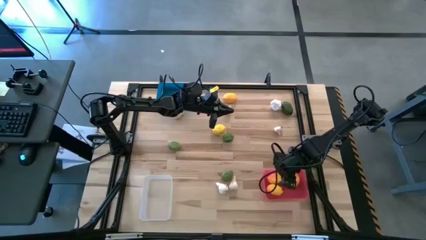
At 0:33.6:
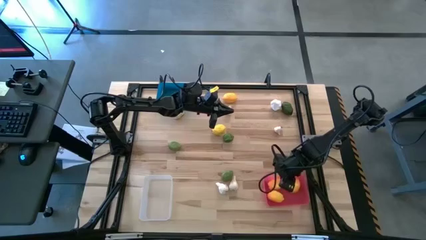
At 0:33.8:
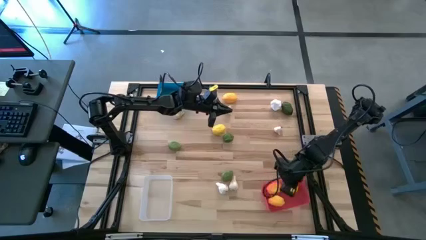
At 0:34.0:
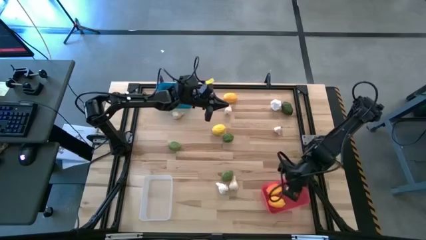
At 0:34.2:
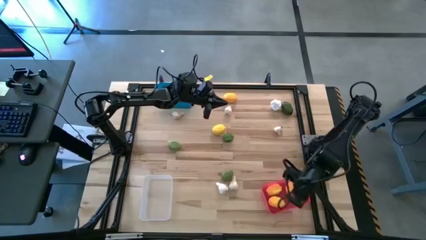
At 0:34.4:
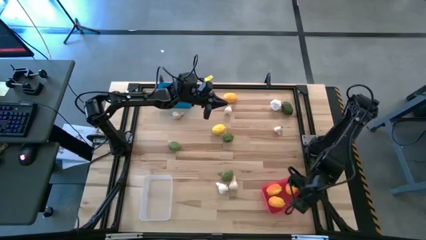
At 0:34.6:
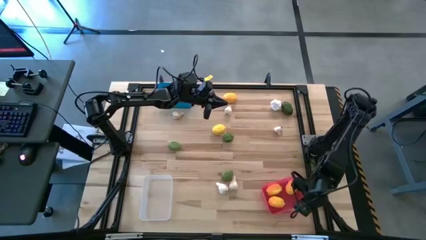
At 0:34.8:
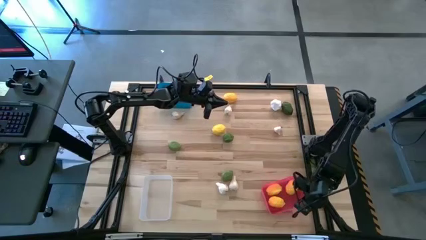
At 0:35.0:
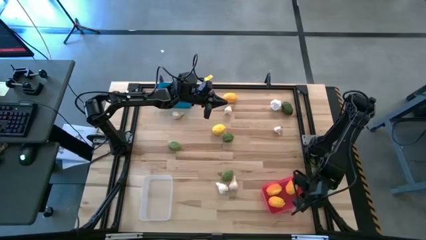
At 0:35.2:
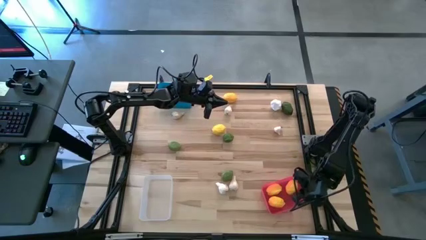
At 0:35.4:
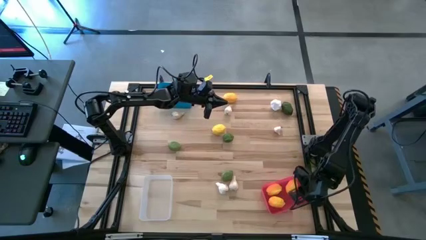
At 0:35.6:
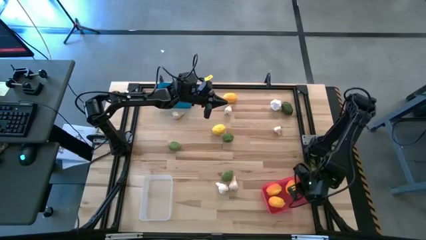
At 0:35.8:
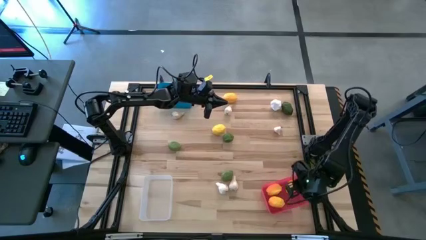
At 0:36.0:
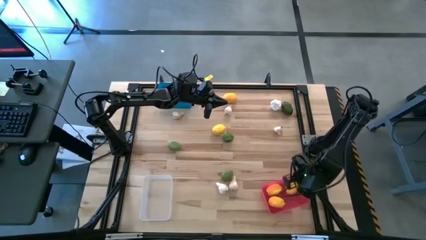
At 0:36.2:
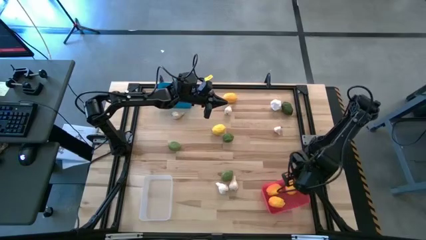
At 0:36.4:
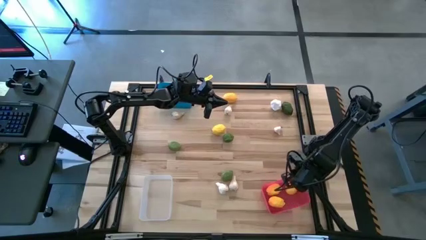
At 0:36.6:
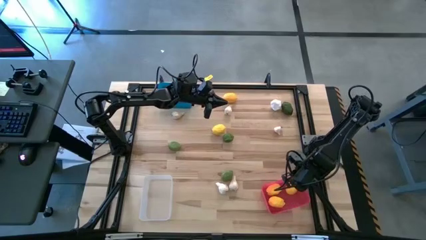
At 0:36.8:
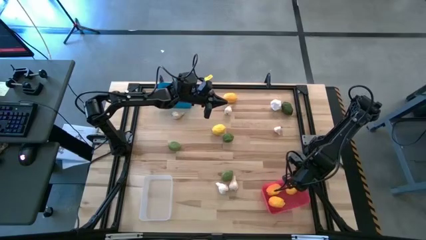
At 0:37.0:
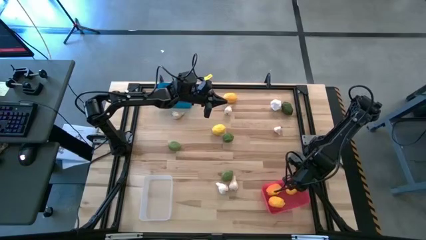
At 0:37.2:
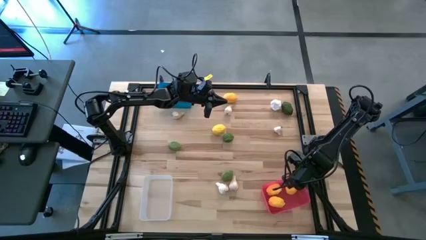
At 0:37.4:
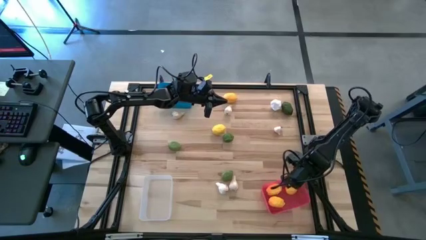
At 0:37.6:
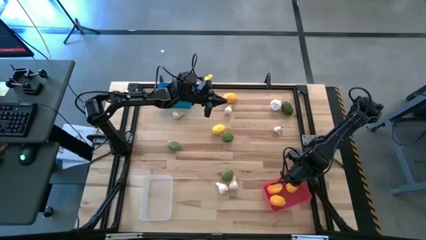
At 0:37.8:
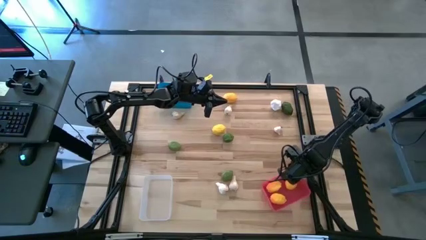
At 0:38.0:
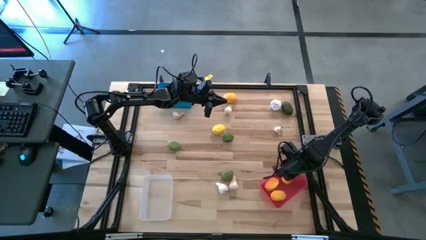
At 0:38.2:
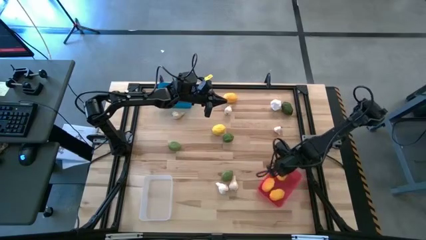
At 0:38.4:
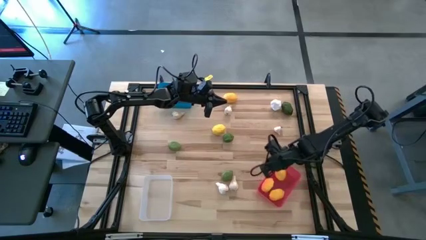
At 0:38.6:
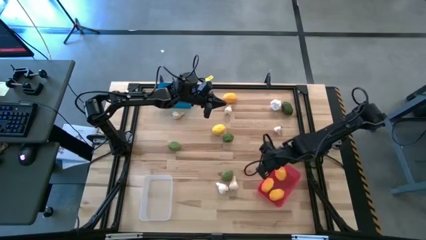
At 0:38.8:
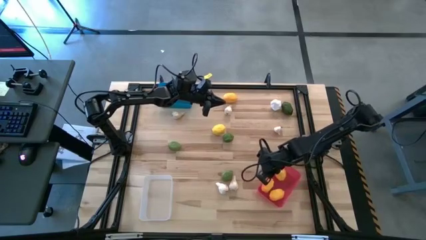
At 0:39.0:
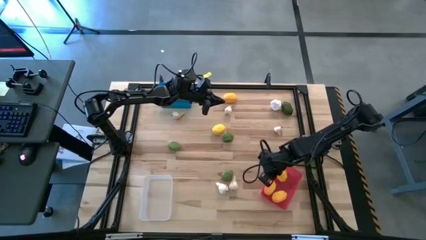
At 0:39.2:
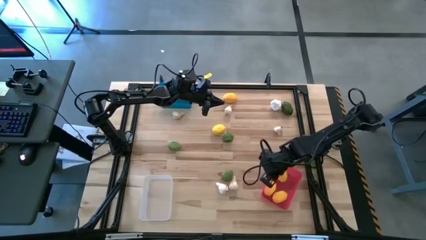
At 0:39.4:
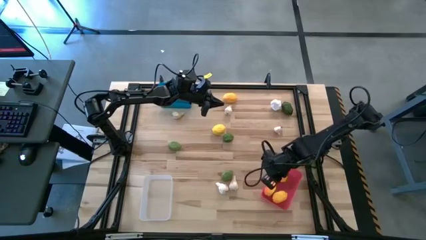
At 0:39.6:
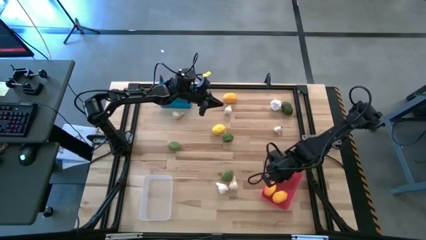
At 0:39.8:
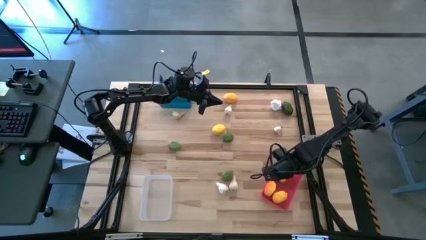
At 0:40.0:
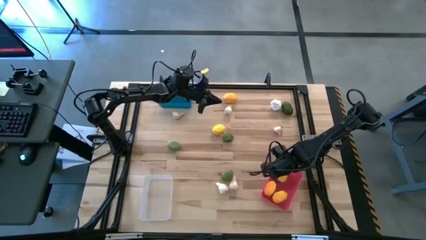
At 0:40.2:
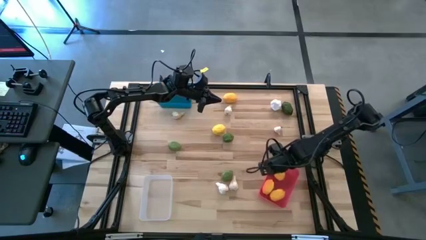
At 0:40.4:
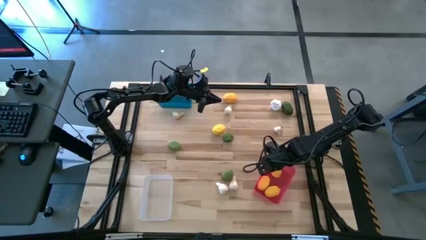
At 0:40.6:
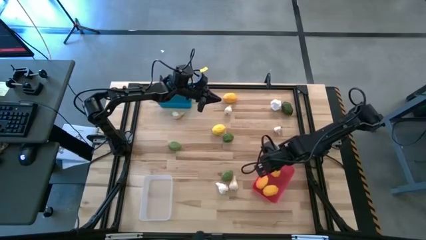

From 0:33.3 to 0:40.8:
Task: Sort produce into baskets
Adjust the red bin

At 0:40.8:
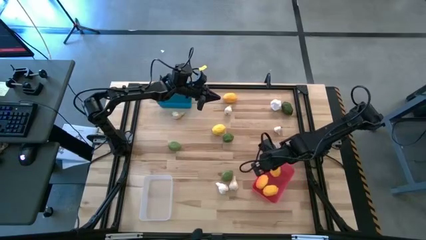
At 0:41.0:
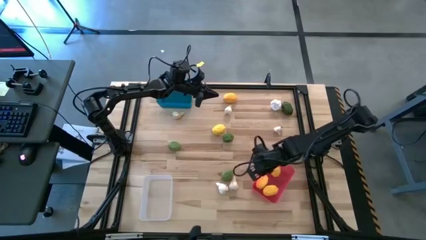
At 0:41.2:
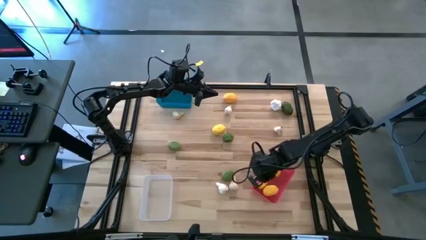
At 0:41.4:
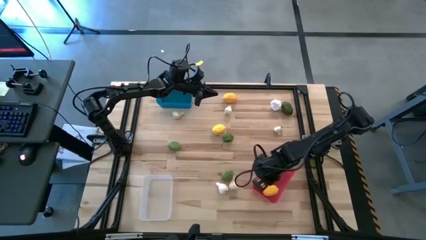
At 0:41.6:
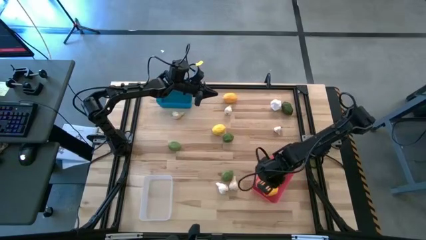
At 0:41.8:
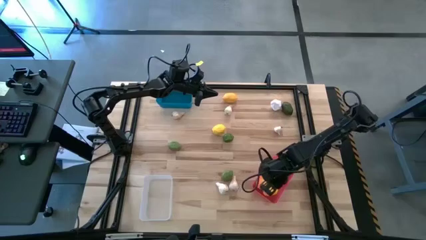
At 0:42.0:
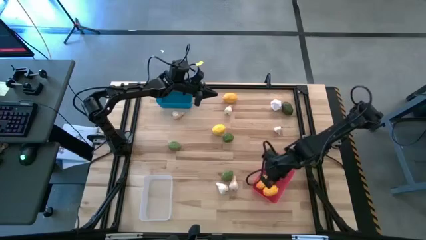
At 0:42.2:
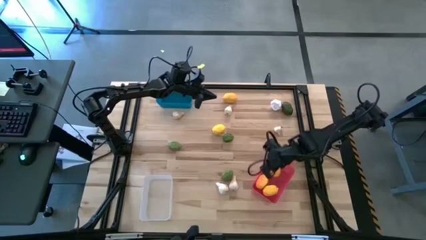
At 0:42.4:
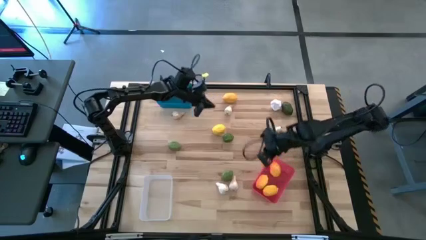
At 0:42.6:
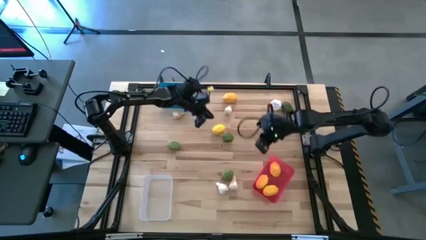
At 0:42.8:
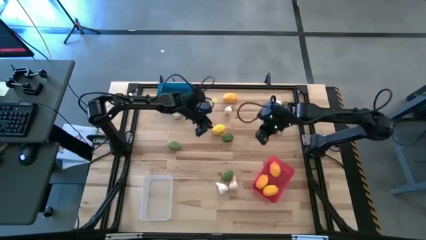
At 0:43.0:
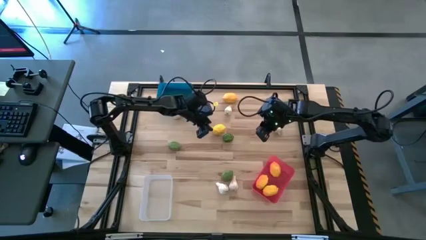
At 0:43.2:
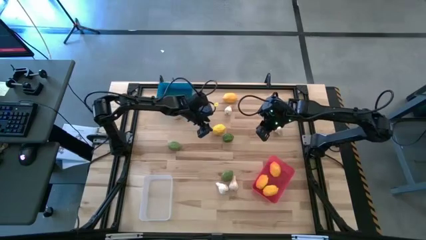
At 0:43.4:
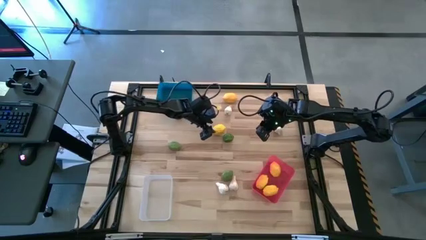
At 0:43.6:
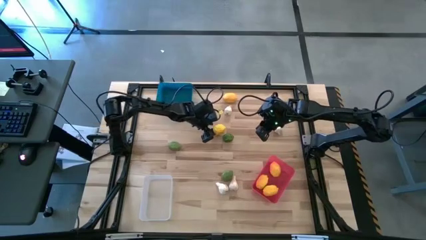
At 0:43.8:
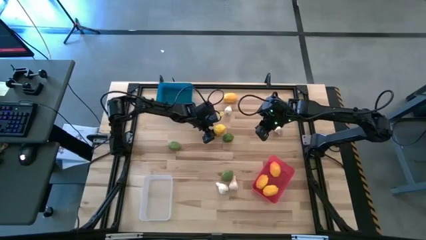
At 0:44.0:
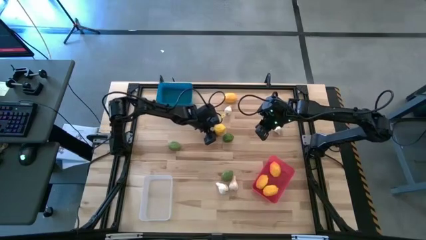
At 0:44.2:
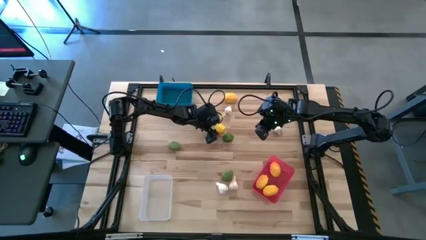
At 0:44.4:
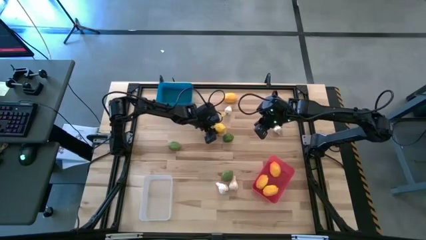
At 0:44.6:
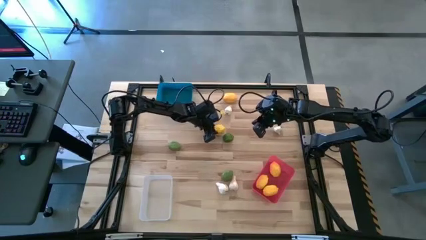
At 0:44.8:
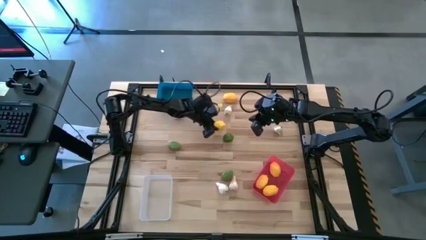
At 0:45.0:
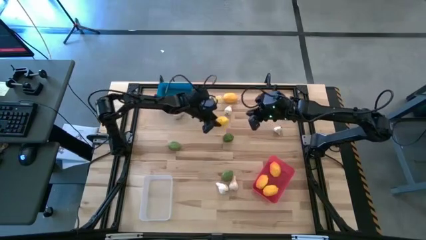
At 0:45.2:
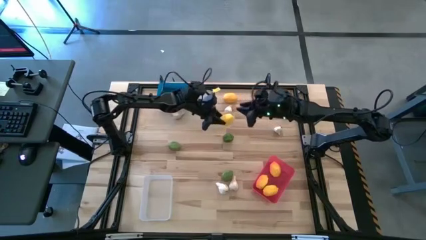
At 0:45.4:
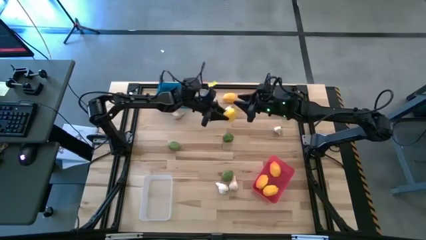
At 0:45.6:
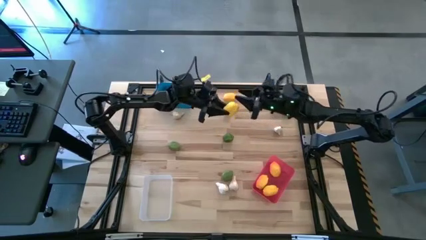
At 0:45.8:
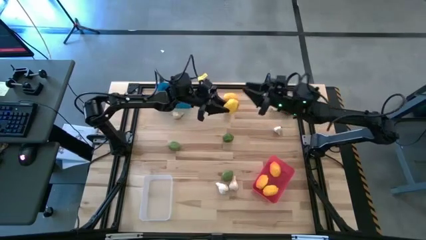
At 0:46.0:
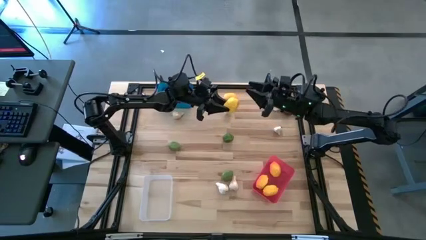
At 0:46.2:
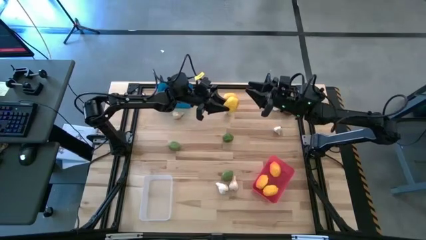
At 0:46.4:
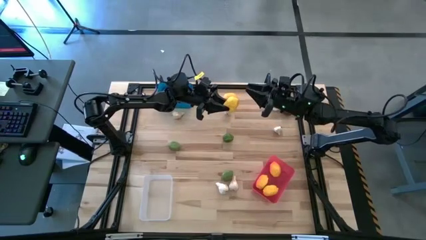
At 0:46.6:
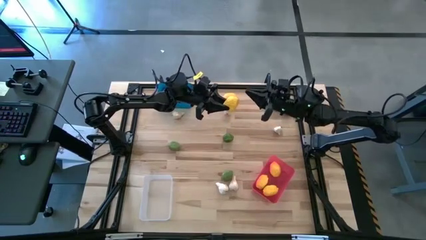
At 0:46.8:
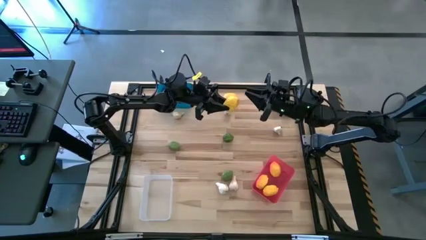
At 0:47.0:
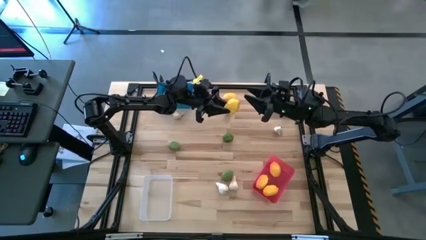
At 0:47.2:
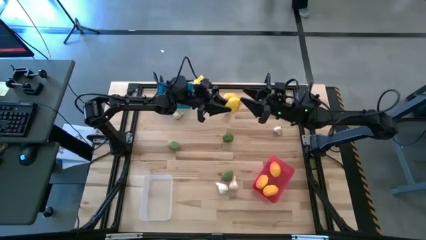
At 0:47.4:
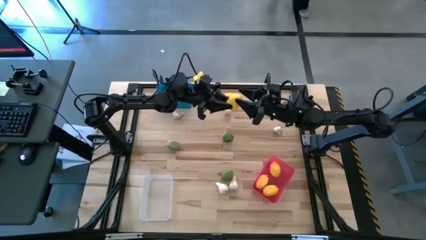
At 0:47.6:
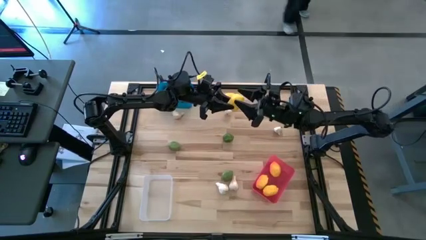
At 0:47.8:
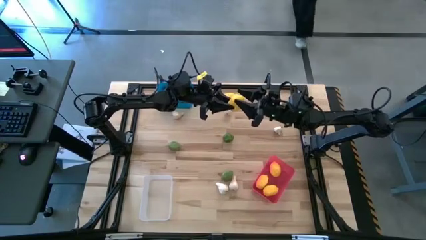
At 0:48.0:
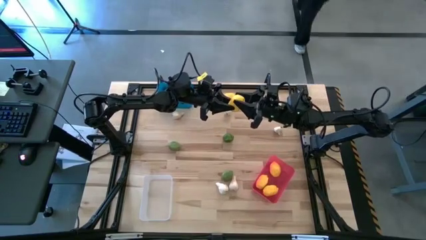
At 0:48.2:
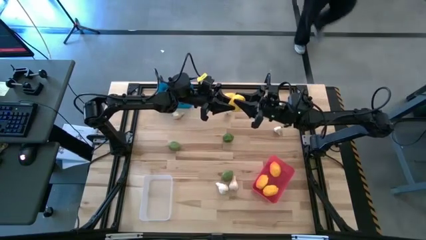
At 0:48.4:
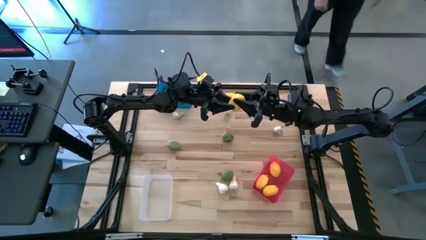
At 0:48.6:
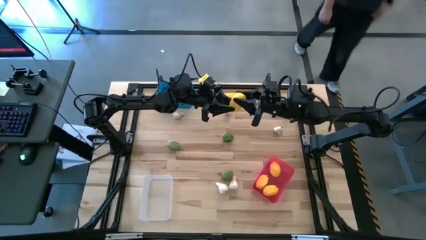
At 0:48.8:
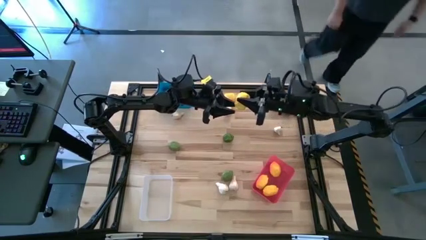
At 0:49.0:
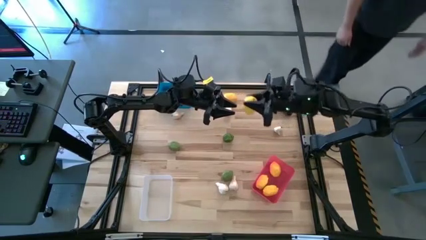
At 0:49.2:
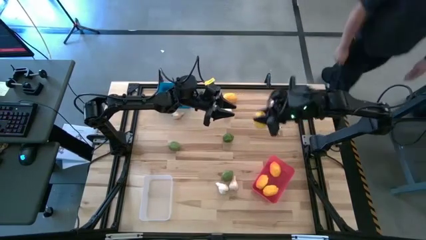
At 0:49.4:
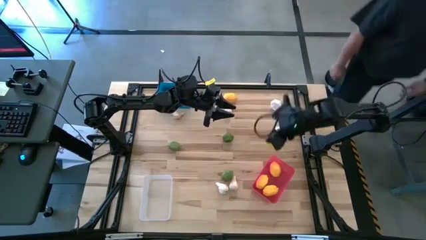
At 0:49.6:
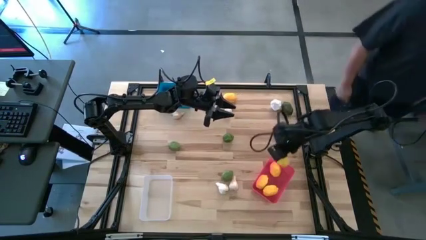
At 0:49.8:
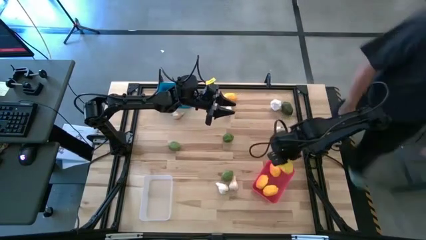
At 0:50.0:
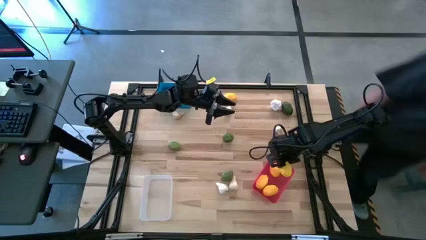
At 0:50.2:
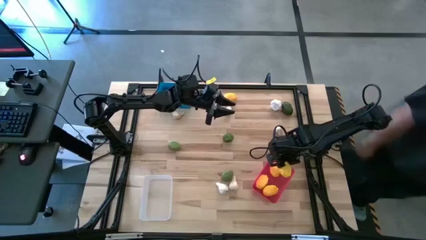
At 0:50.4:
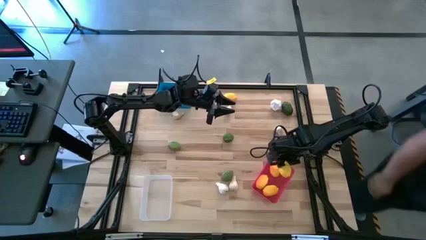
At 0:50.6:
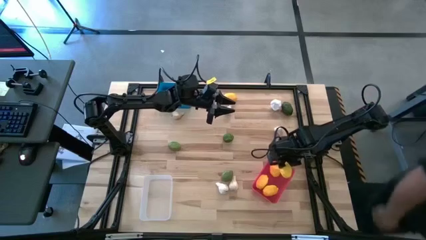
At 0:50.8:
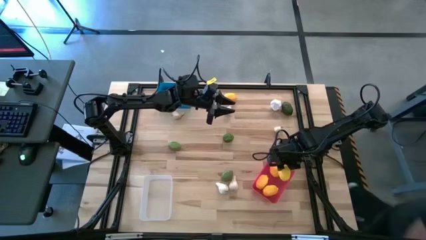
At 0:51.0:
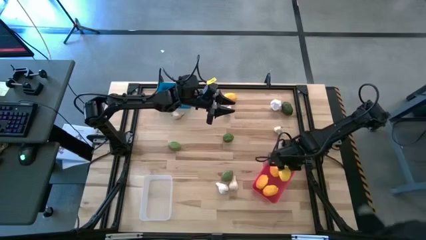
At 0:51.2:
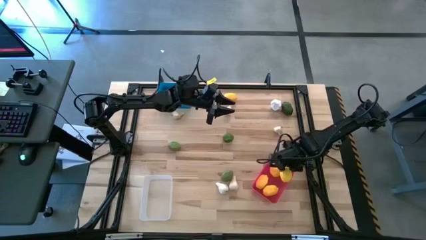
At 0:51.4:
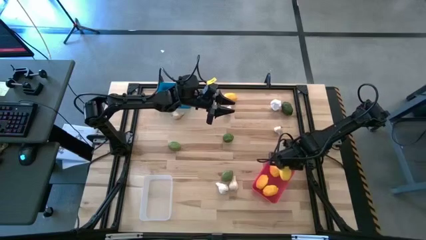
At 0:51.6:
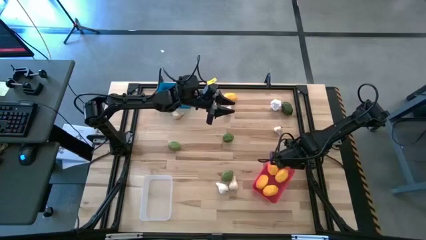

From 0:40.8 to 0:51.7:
Put the lemon into the red bin
